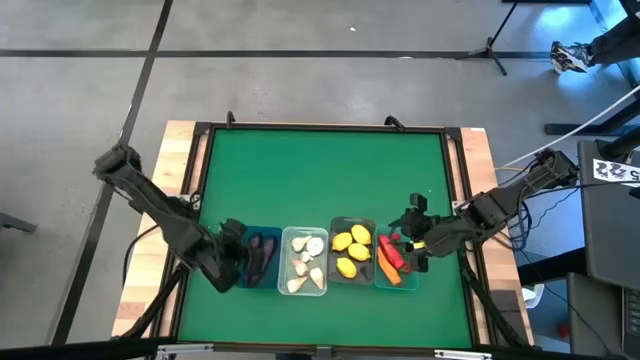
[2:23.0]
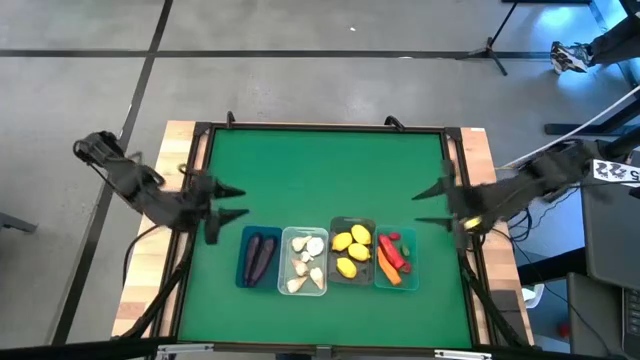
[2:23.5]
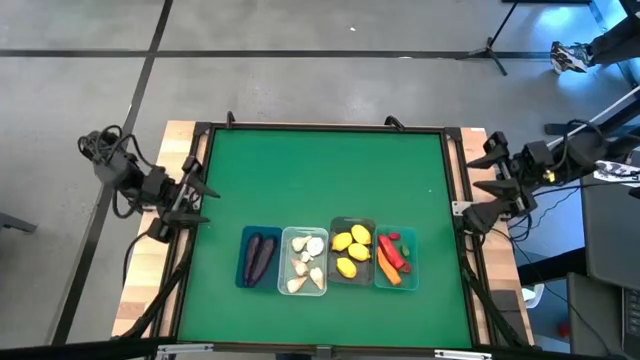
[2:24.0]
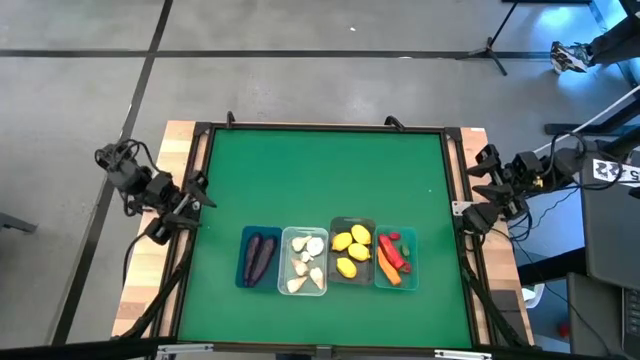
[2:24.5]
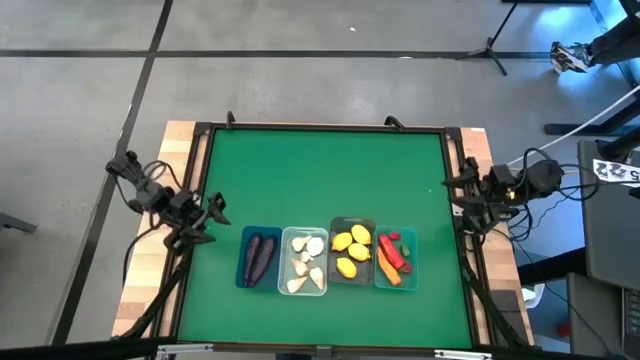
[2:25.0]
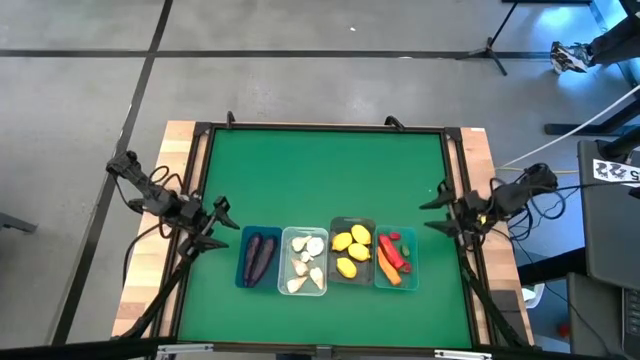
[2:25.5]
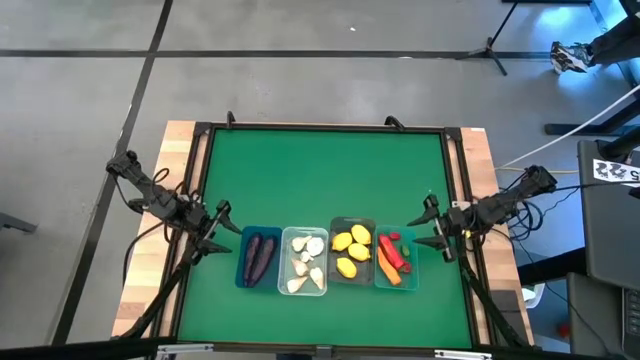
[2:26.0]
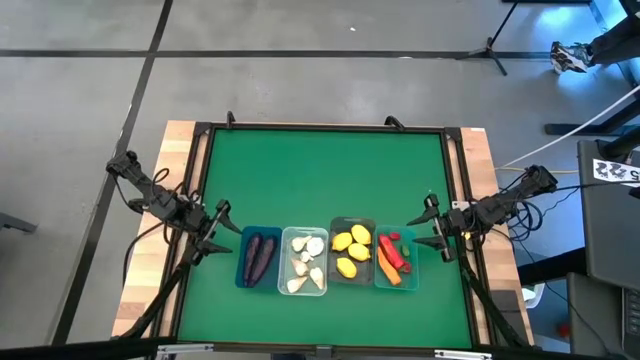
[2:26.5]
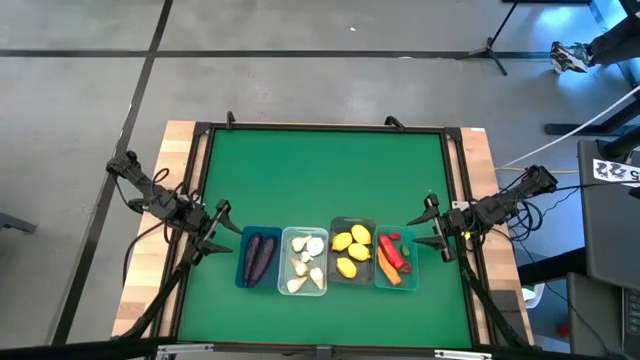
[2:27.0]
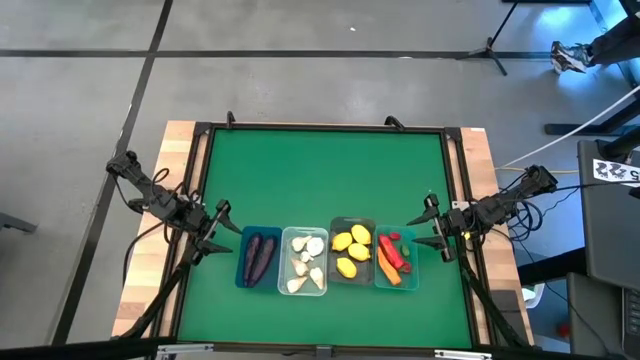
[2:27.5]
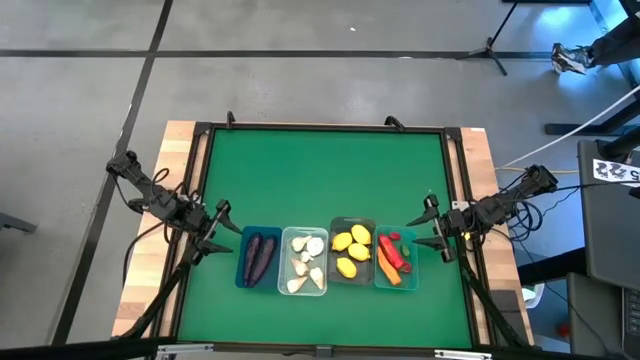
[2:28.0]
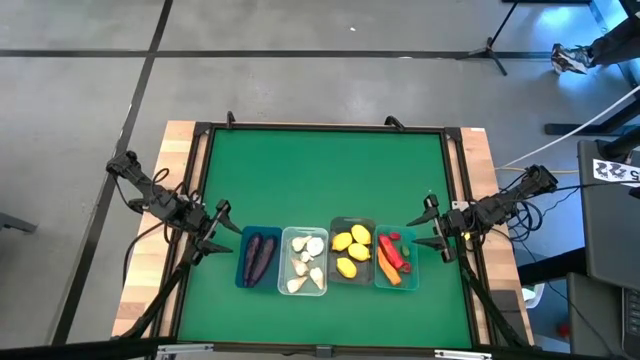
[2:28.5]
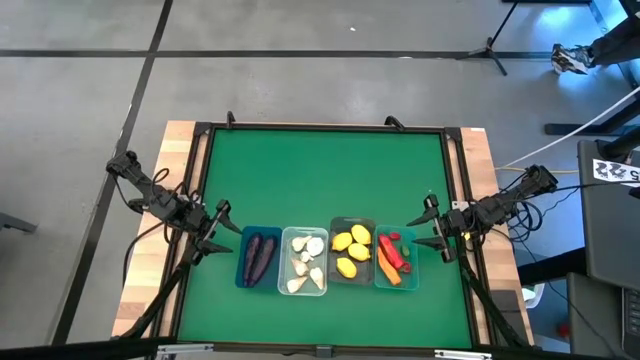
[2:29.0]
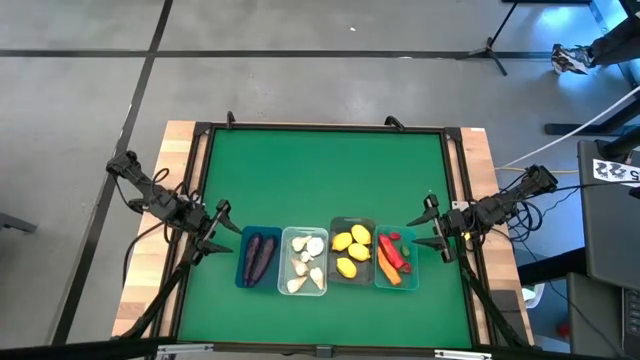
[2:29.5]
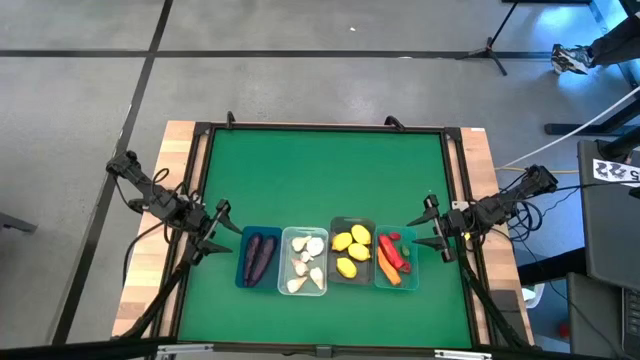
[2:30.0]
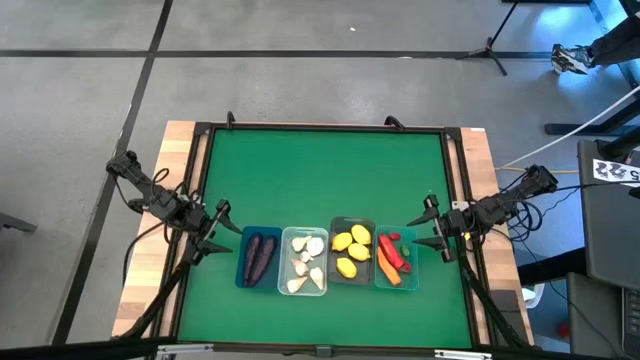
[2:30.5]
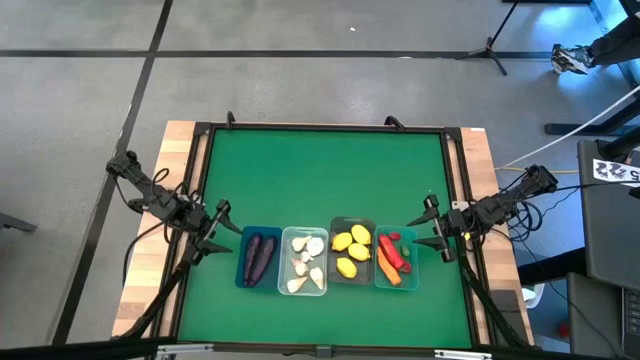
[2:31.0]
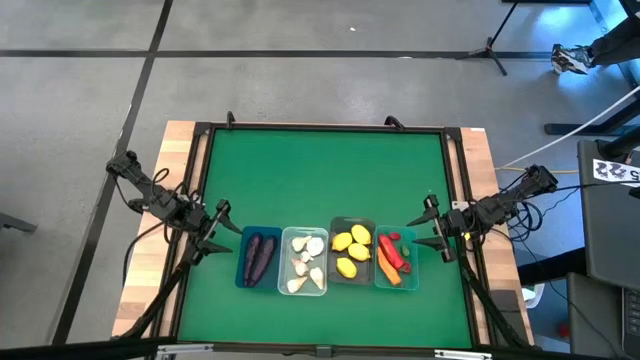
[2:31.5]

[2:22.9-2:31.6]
Task: Sort produce into baskets
Return to Home Position

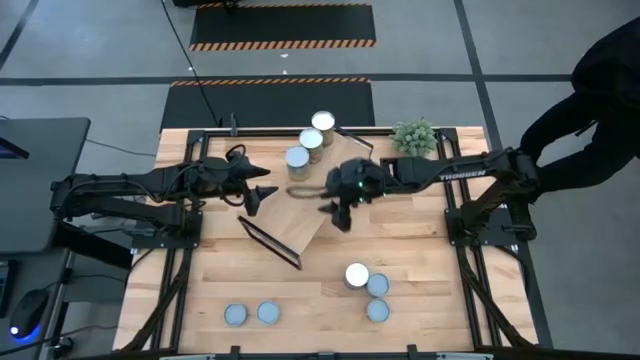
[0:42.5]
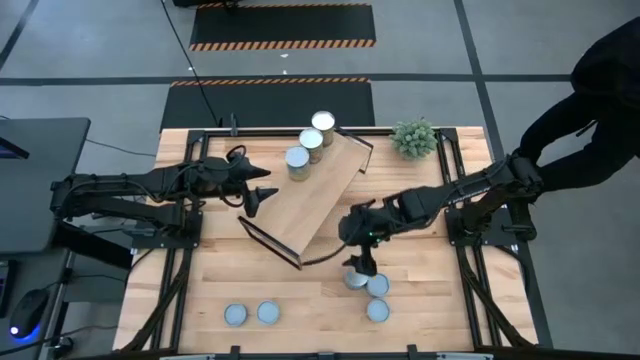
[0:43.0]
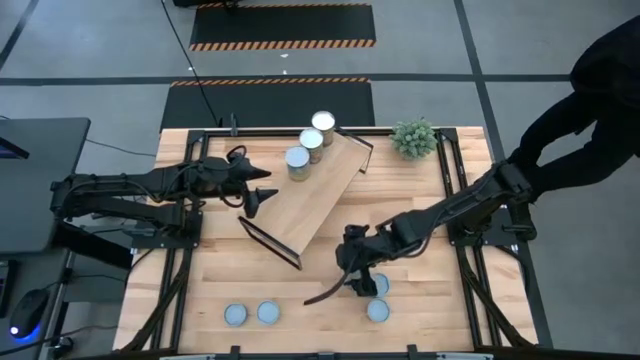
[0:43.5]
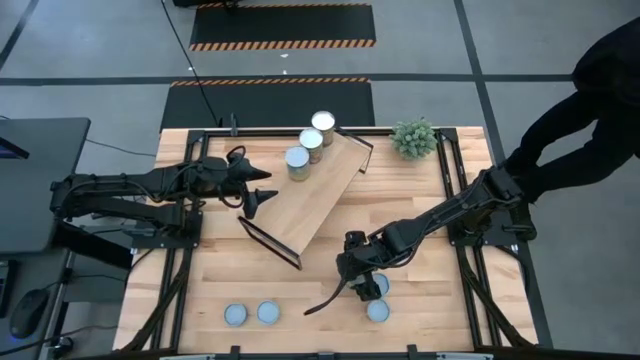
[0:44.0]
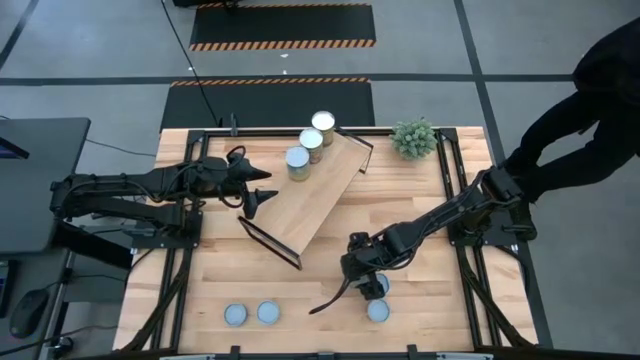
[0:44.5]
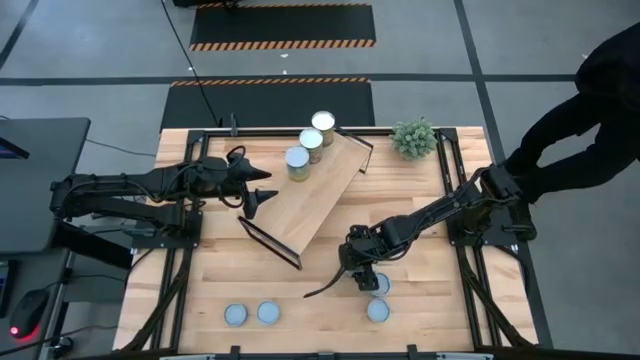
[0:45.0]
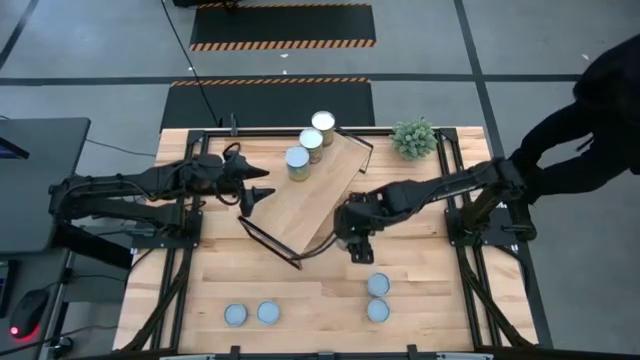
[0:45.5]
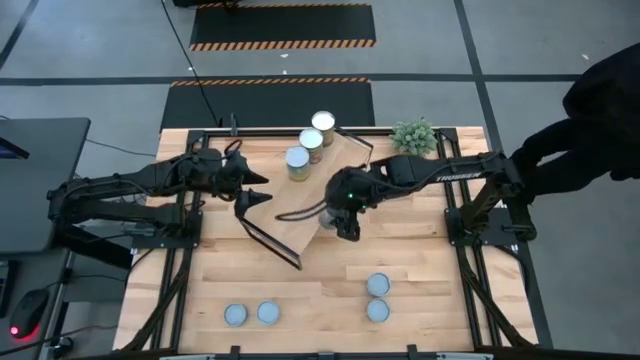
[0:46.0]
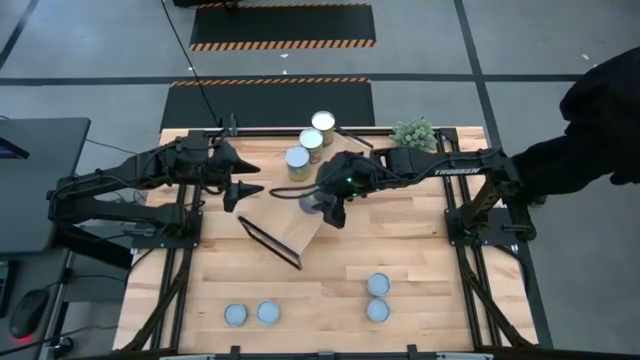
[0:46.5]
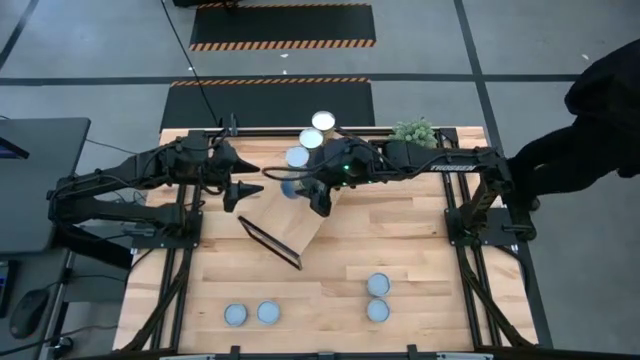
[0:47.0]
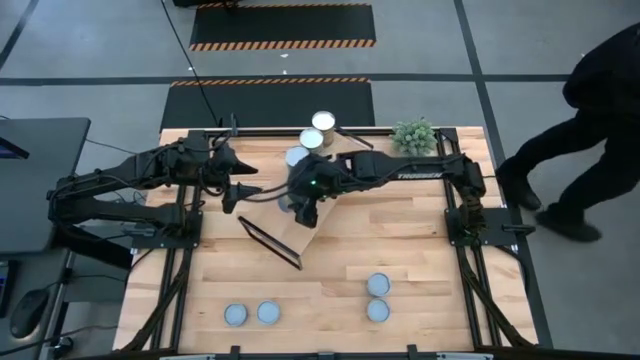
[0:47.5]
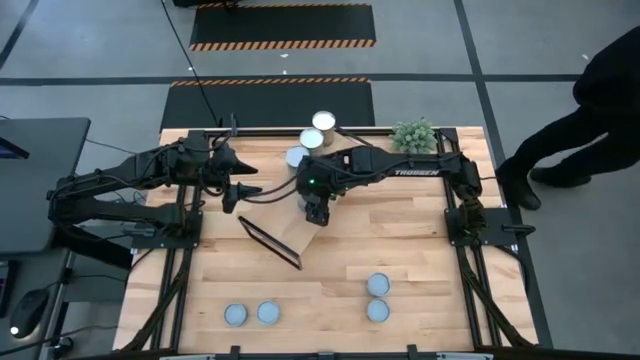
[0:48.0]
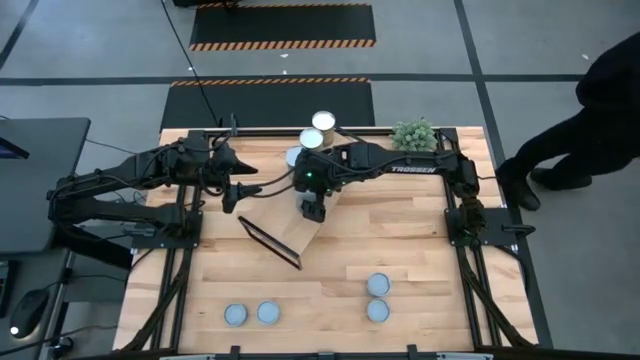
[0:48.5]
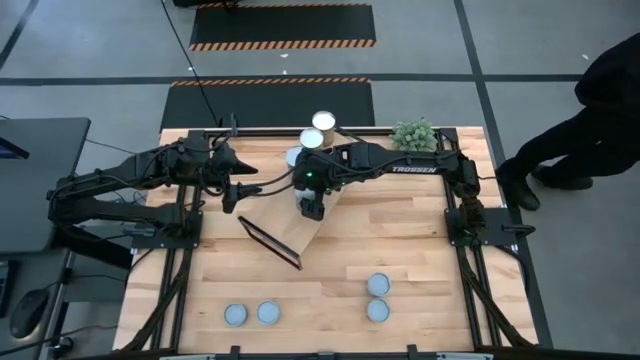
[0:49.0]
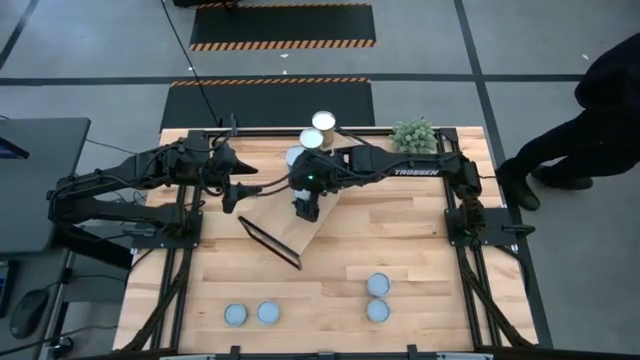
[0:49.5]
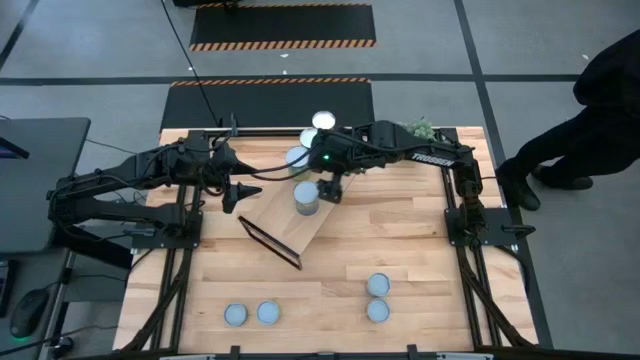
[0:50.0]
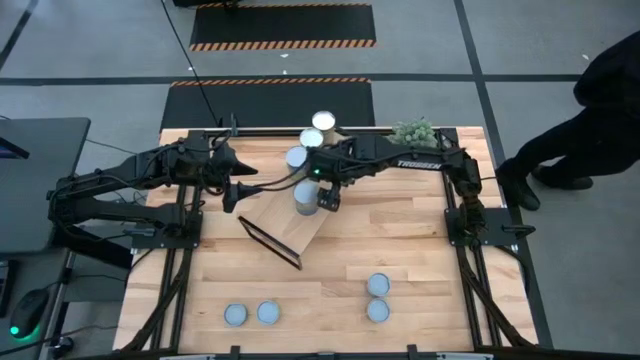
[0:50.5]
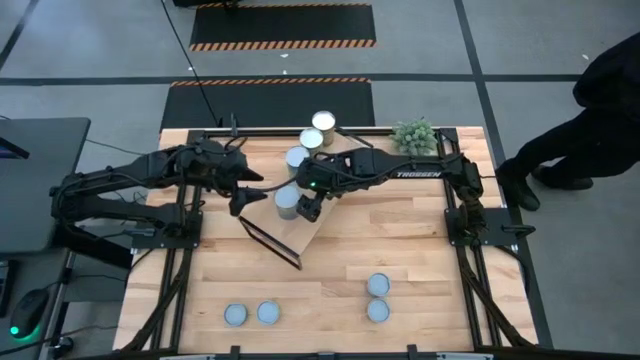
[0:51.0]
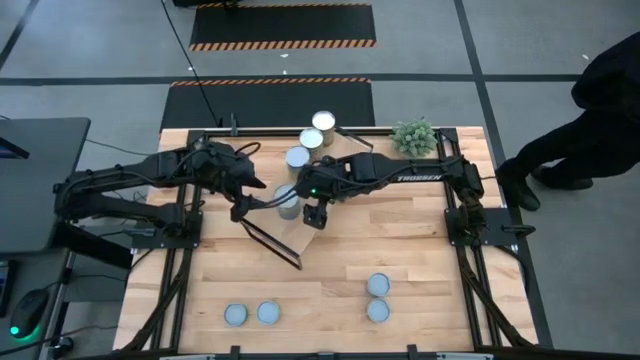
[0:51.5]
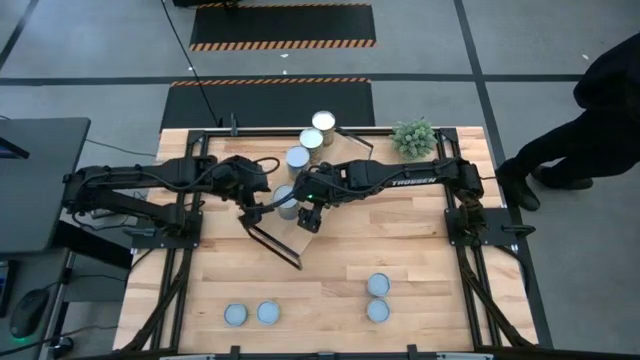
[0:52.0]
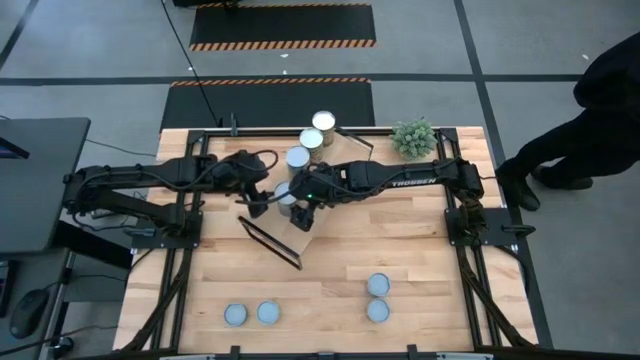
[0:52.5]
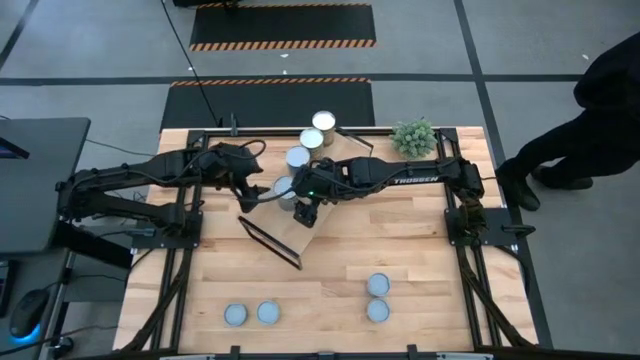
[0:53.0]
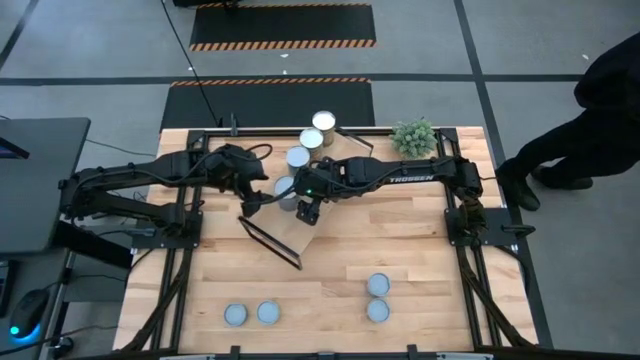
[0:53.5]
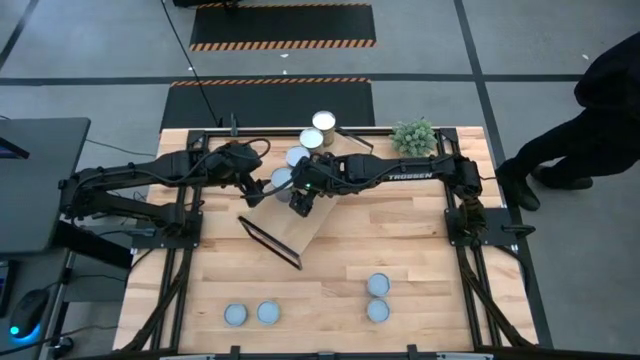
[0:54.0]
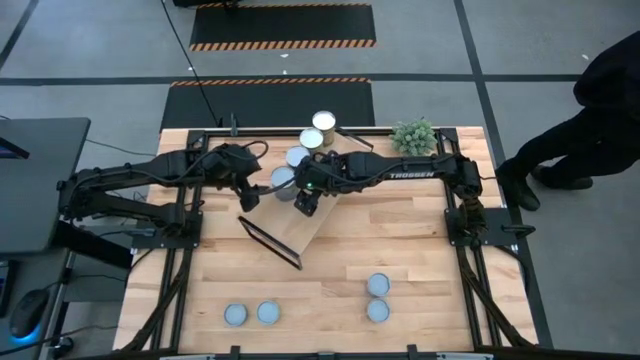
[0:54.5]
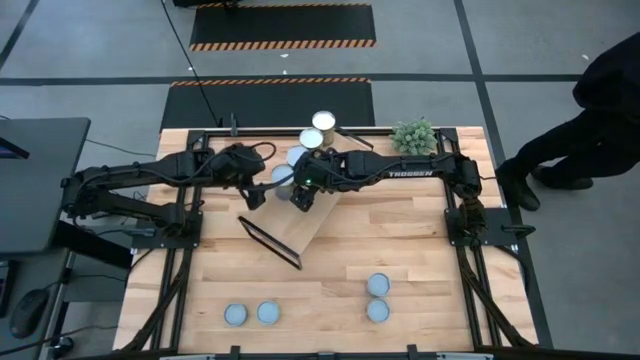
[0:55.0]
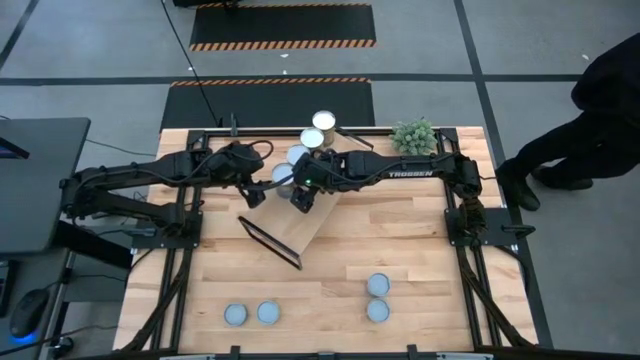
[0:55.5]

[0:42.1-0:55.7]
Task: Pick and place cans onto a shelf
Put the canned peas on the shelf
